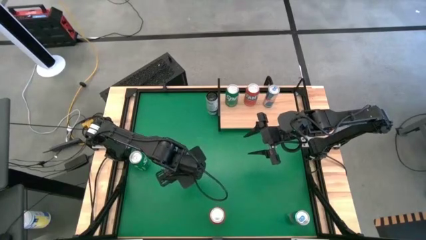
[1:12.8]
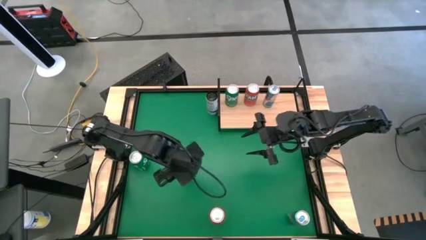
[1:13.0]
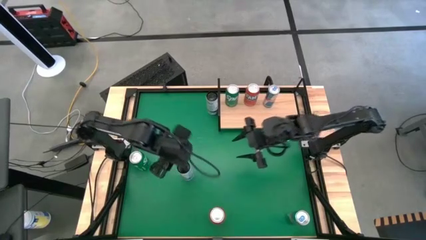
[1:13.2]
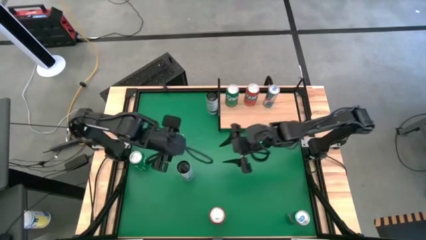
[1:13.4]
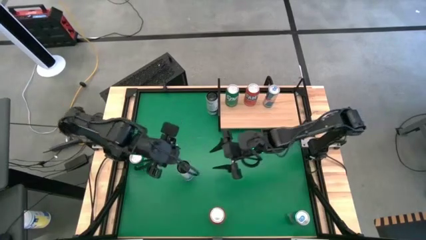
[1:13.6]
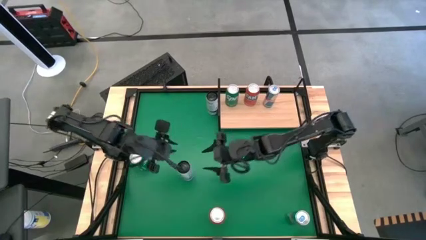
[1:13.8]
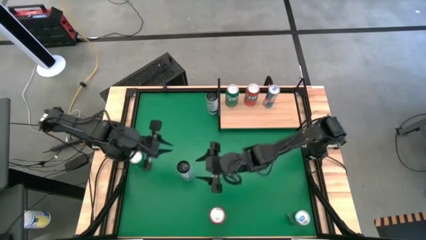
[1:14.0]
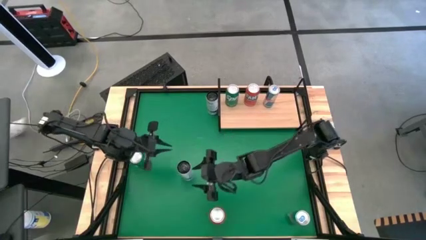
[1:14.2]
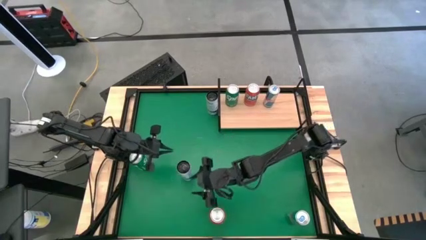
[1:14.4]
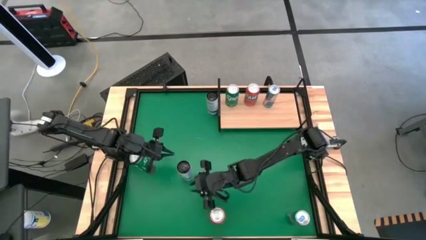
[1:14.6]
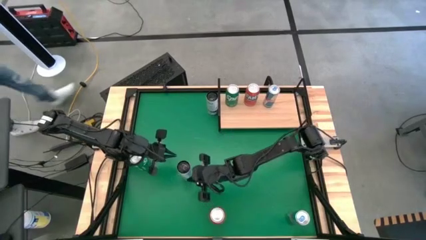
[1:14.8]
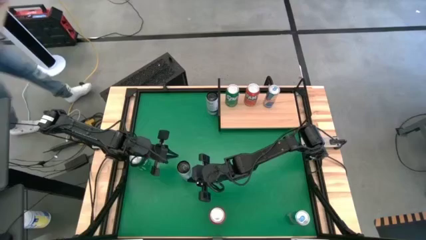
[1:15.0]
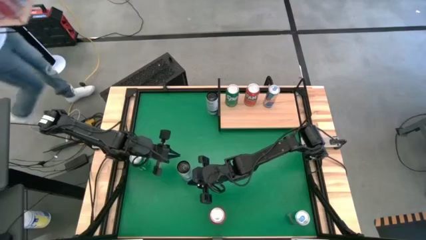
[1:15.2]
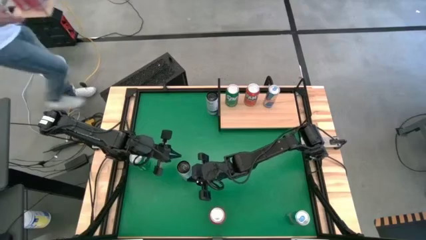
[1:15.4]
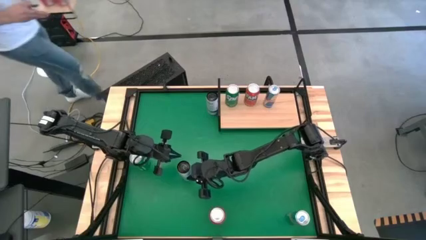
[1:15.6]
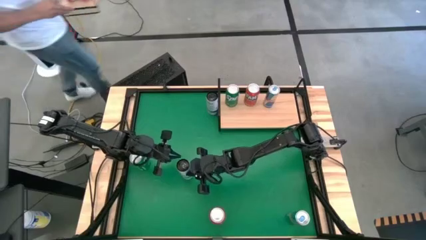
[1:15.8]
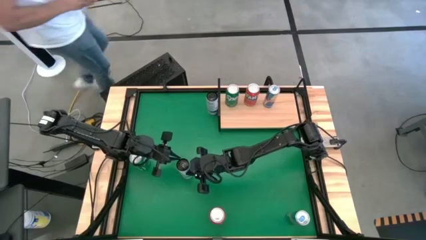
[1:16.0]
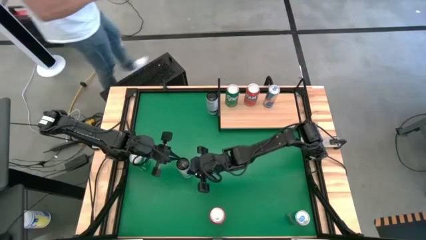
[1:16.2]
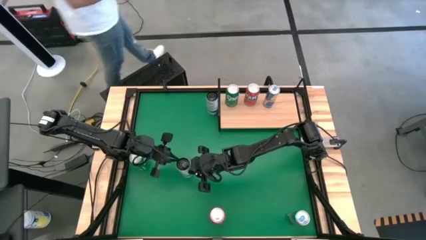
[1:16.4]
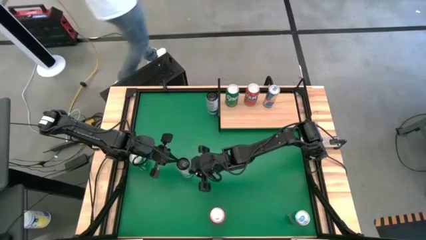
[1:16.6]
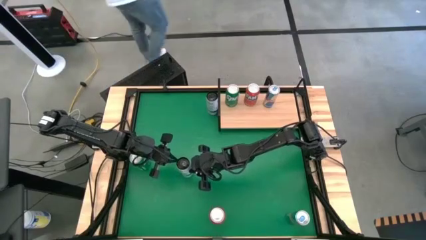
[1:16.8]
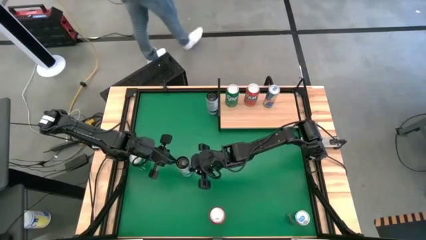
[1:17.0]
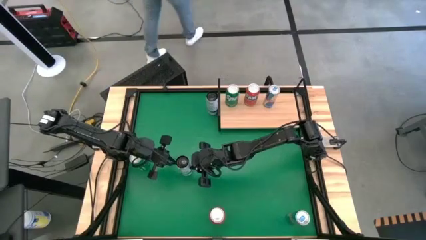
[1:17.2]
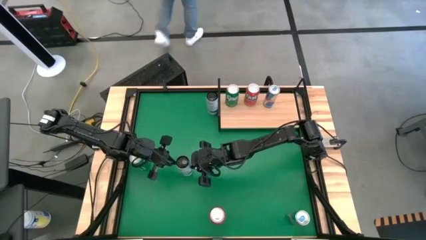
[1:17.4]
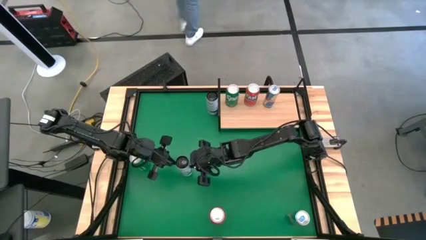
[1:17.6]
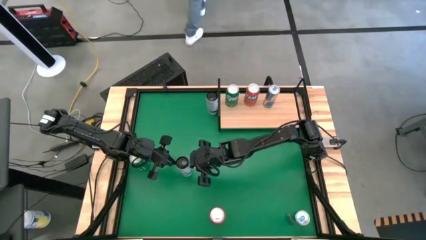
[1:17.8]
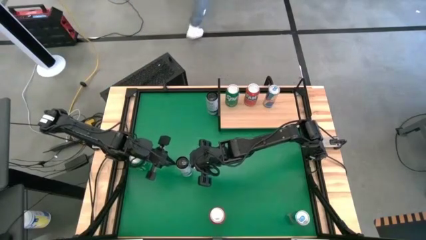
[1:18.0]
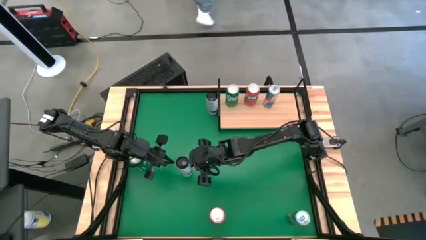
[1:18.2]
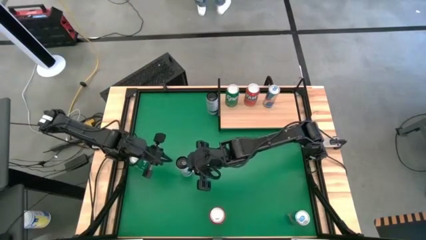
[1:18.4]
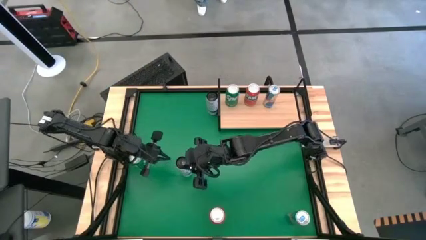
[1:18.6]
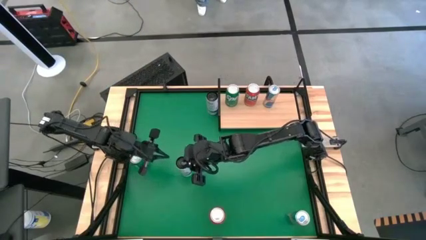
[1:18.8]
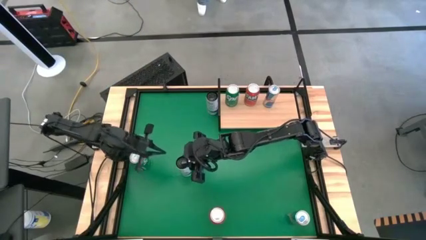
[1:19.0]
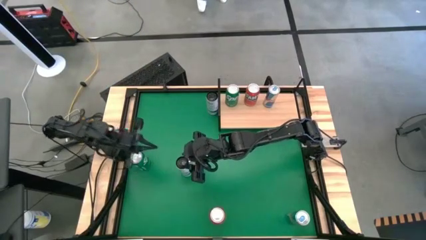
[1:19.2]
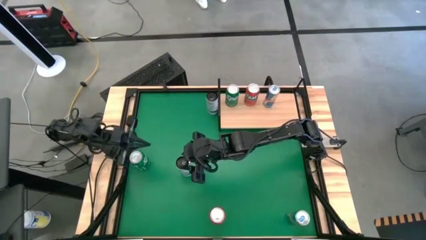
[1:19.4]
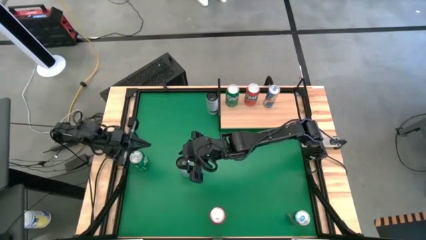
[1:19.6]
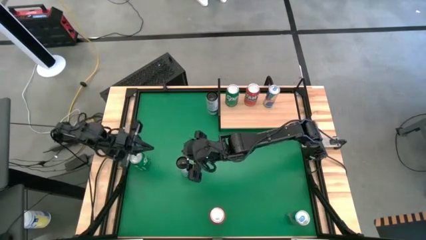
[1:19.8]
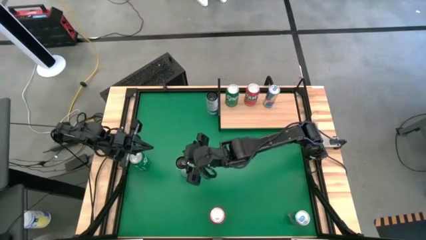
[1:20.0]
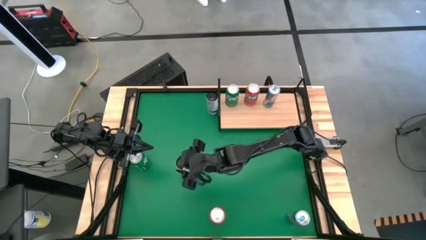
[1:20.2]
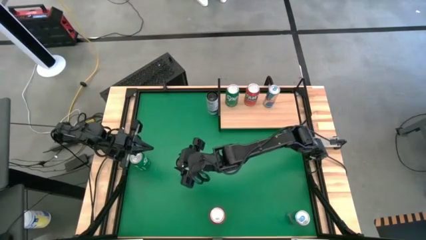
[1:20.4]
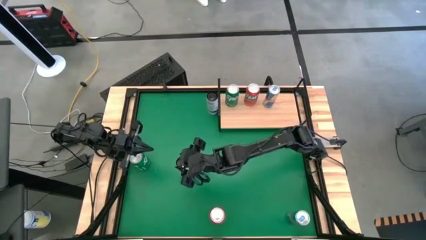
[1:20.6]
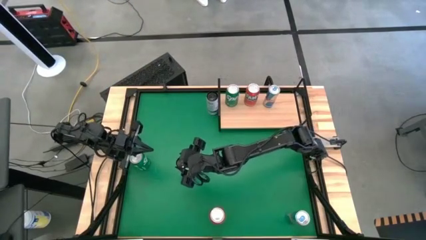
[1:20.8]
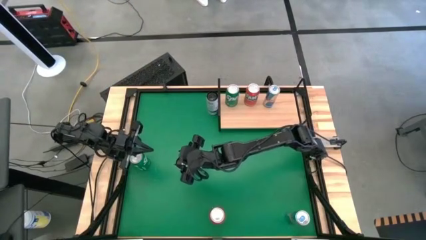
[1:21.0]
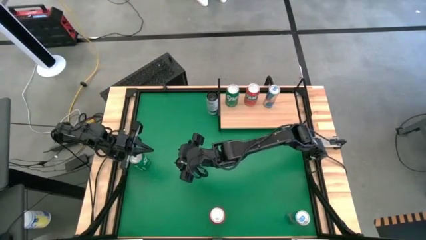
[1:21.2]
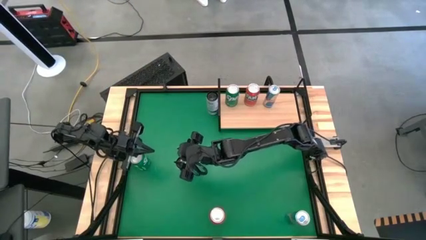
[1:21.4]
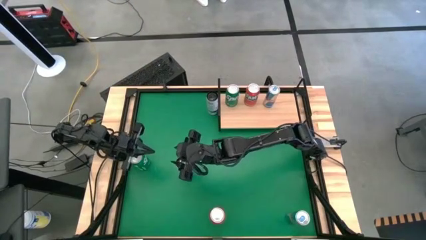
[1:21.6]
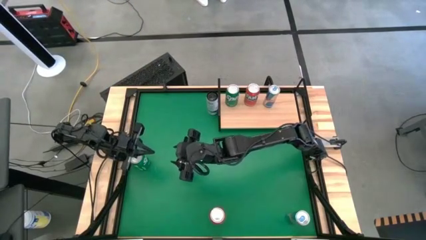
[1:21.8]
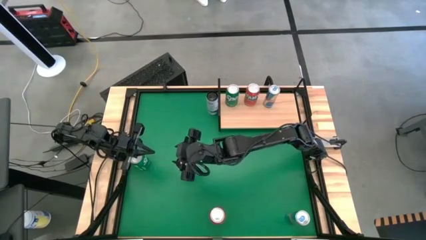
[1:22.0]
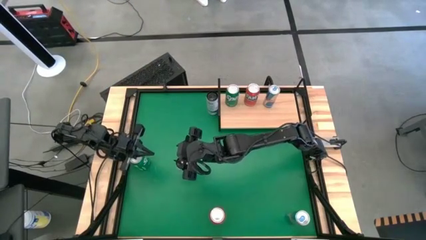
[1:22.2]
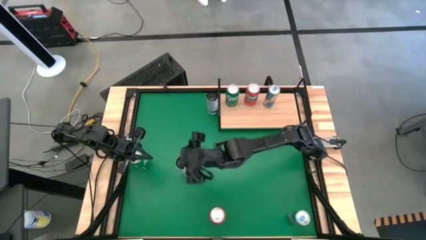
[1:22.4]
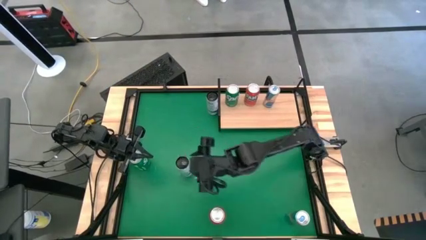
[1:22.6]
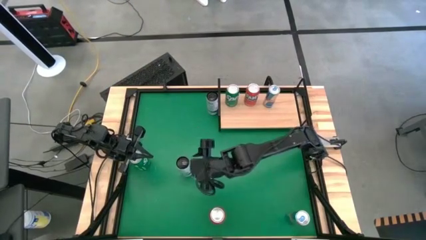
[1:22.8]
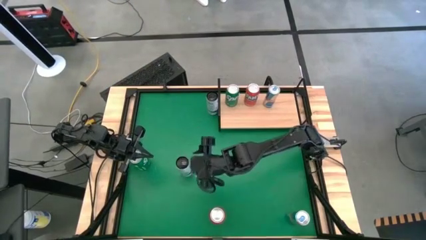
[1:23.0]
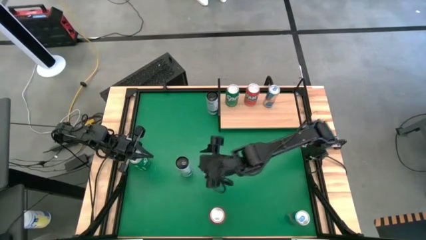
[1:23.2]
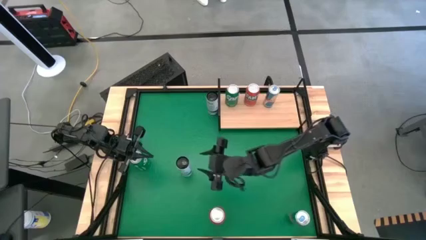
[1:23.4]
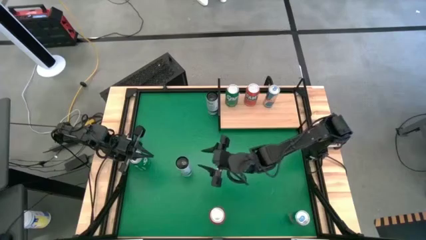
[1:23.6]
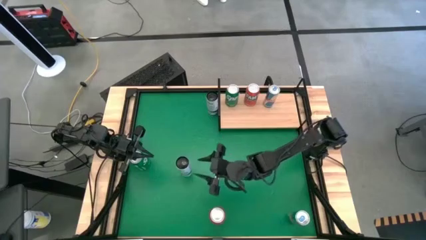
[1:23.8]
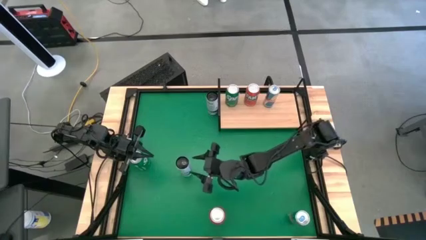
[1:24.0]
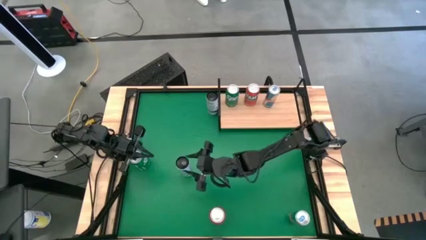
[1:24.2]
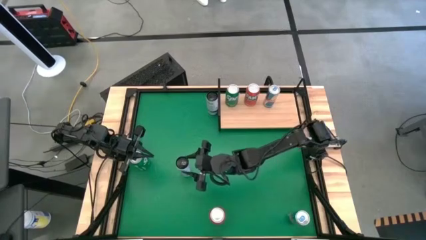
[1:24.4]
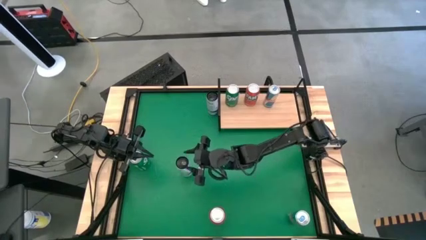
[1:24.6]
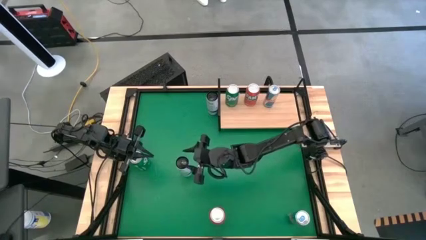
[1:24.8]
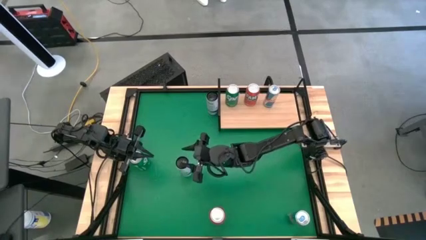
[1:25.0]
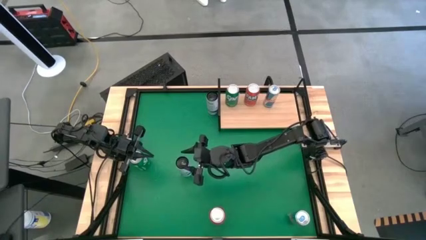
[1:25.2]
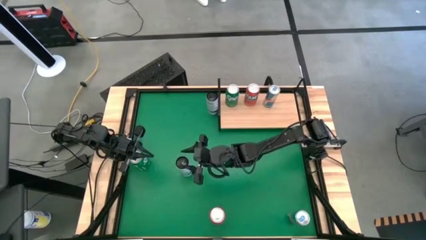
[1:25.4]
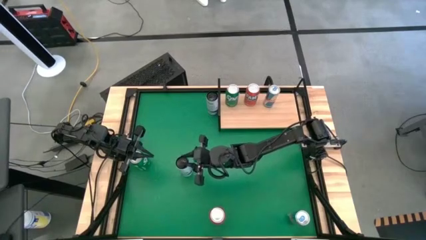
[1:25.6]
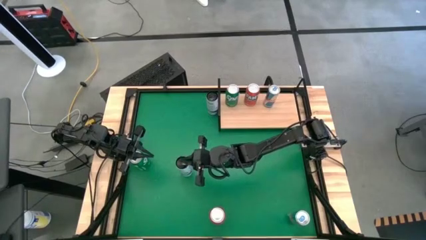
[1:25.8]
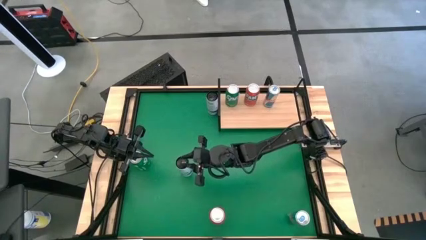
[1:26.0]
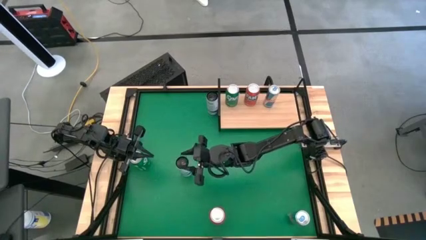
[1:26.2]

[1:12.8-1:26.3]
Task: Place canned beverage on shelf
Put the bottom white and blue soda can on the shelf
